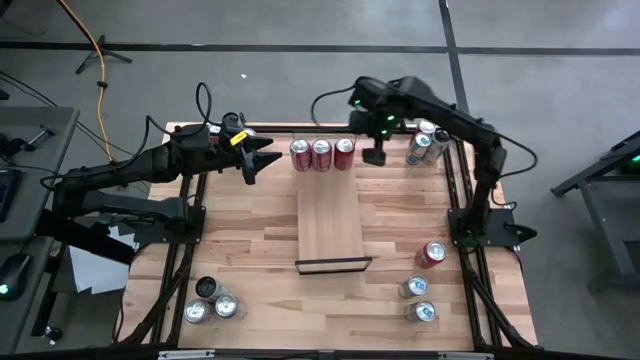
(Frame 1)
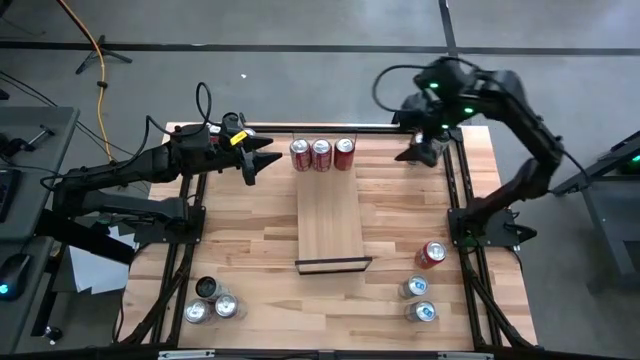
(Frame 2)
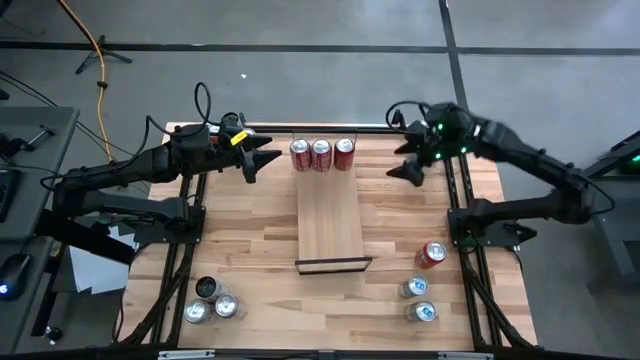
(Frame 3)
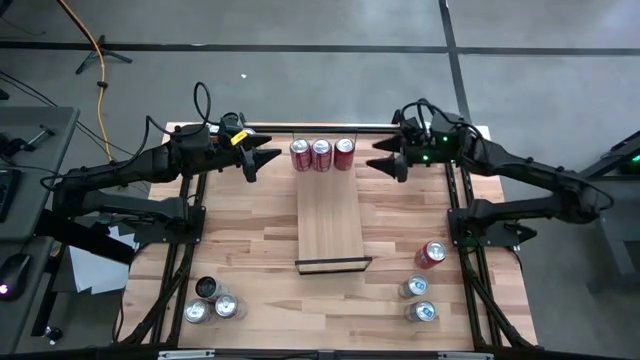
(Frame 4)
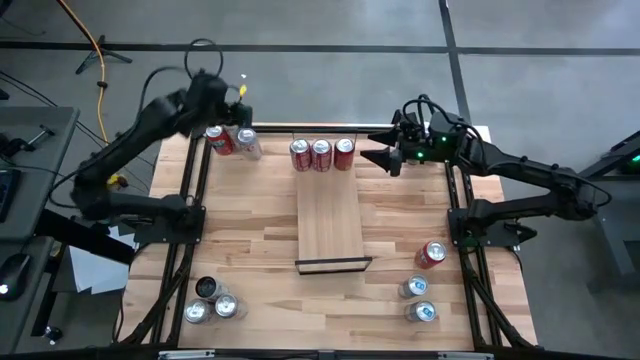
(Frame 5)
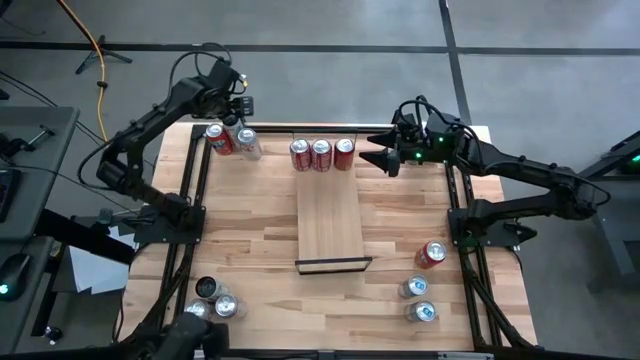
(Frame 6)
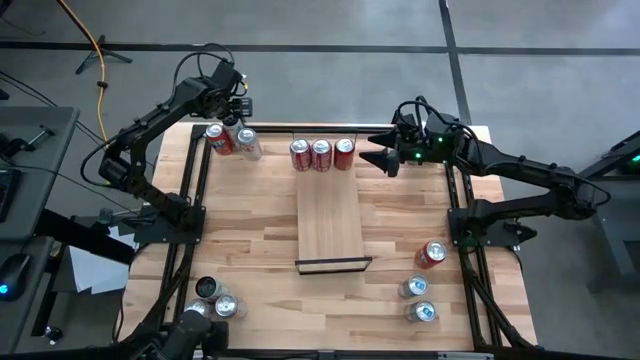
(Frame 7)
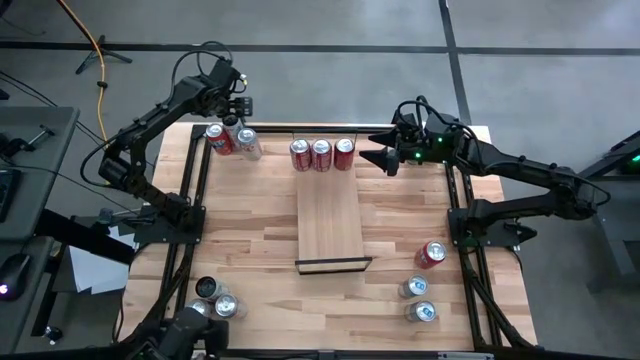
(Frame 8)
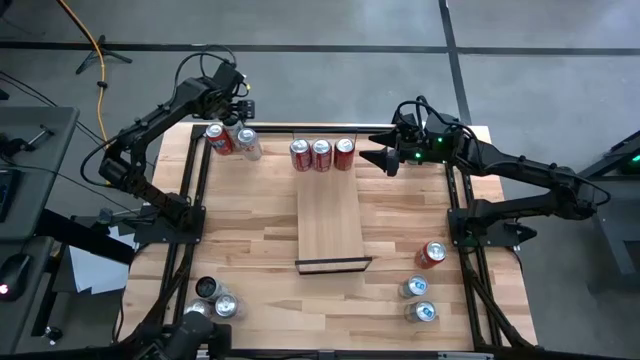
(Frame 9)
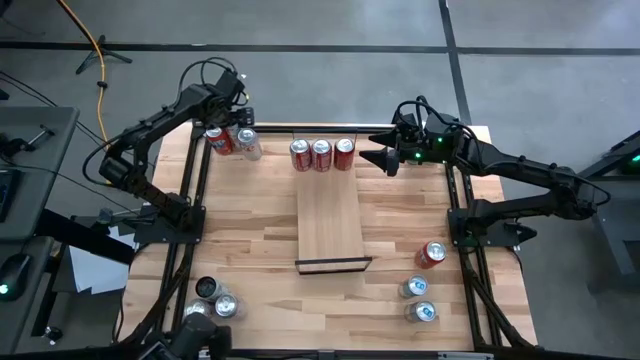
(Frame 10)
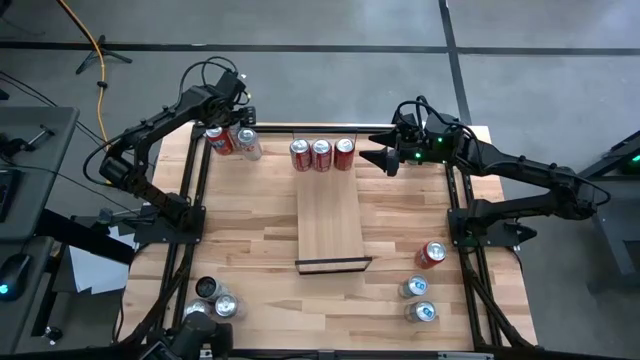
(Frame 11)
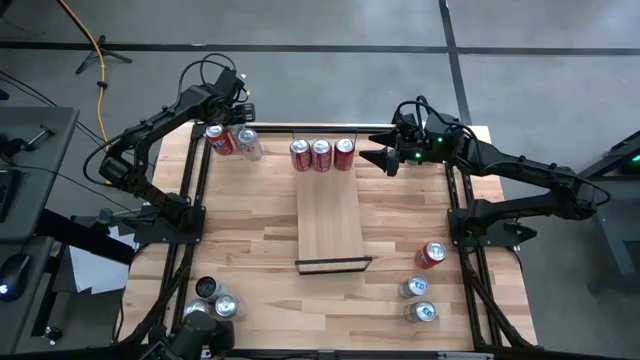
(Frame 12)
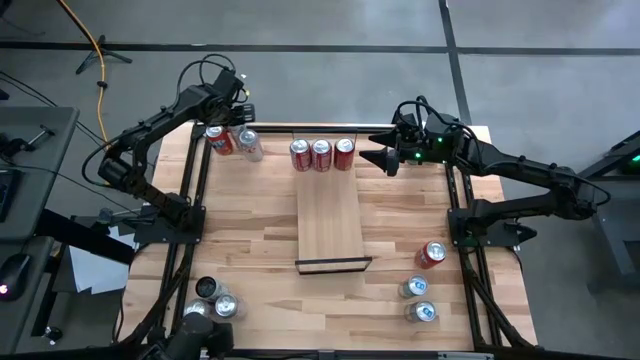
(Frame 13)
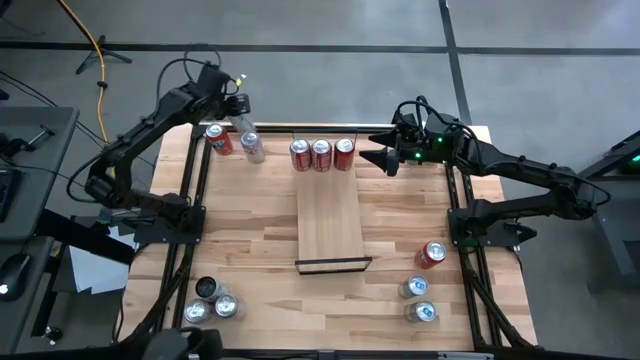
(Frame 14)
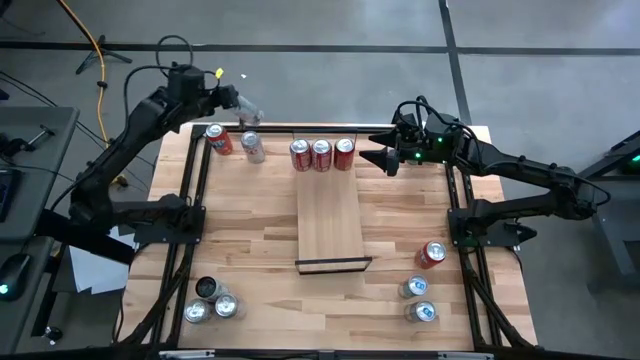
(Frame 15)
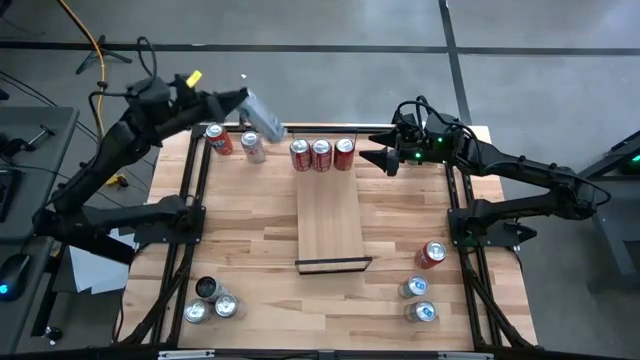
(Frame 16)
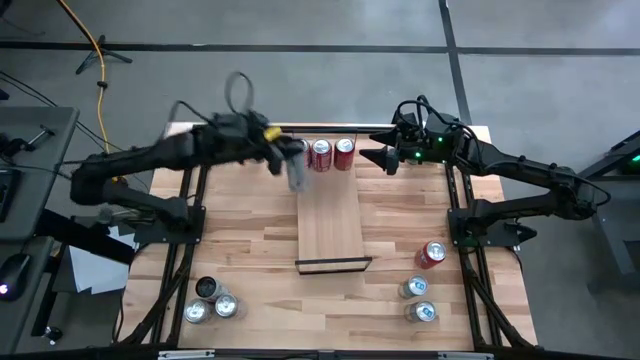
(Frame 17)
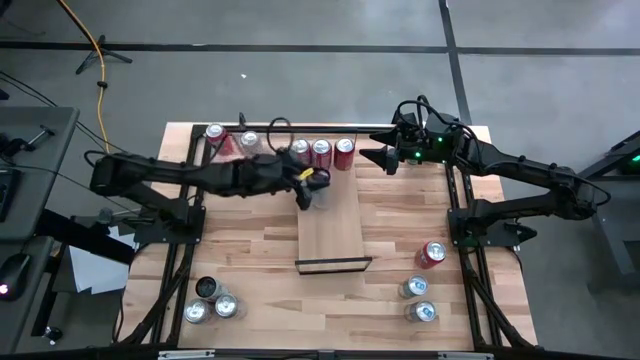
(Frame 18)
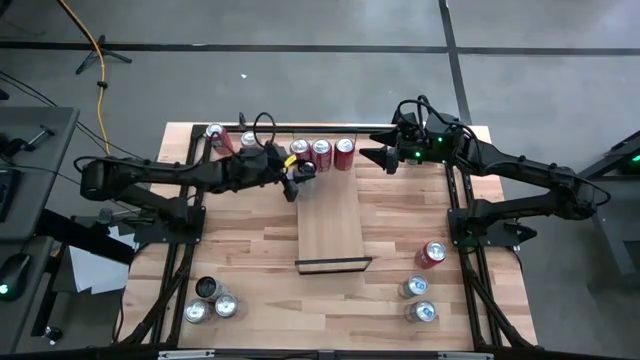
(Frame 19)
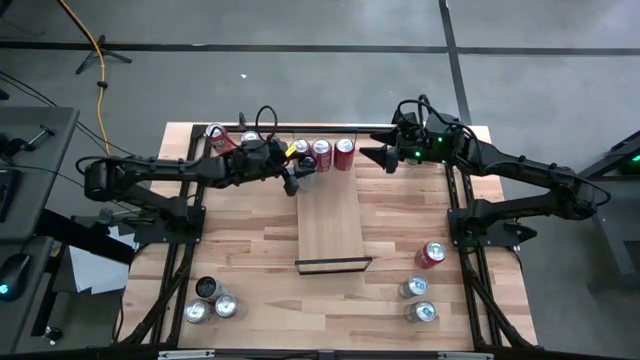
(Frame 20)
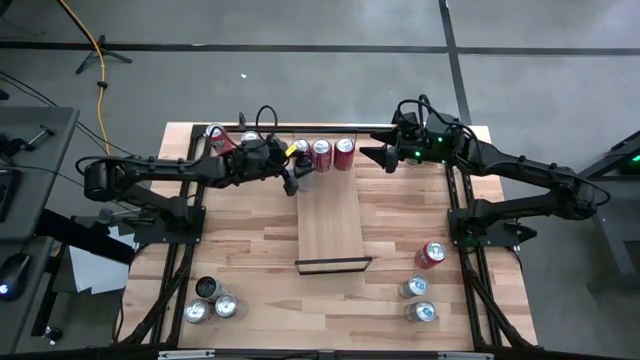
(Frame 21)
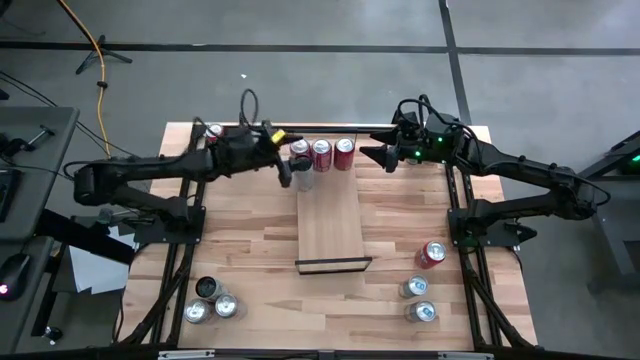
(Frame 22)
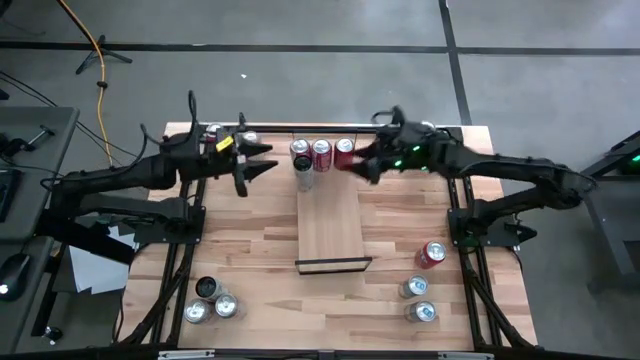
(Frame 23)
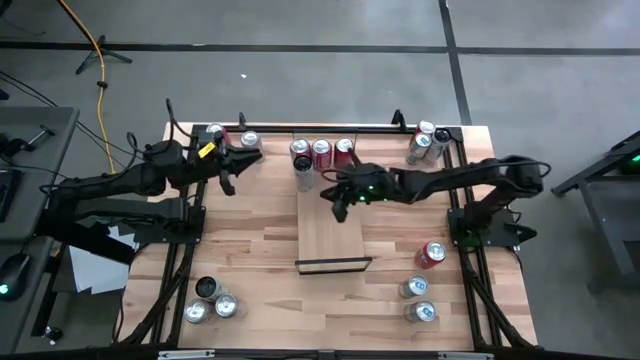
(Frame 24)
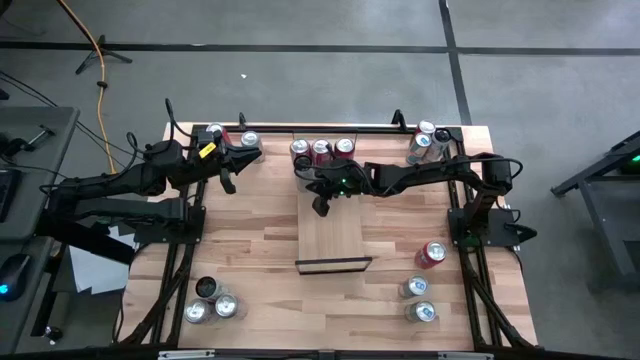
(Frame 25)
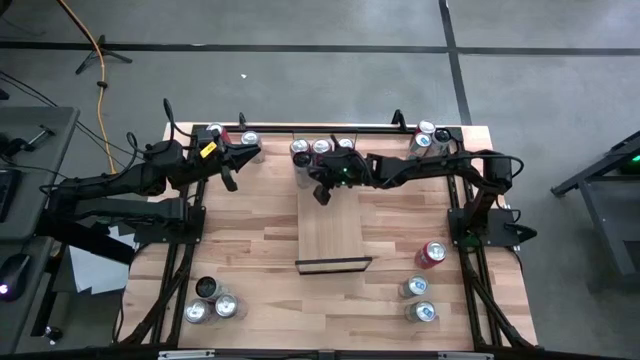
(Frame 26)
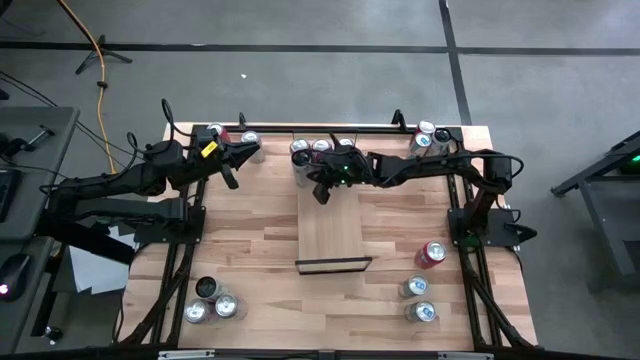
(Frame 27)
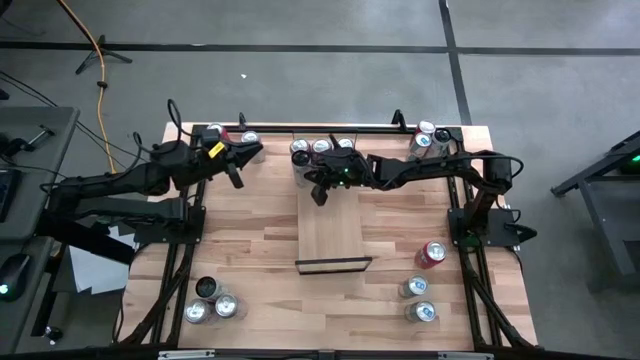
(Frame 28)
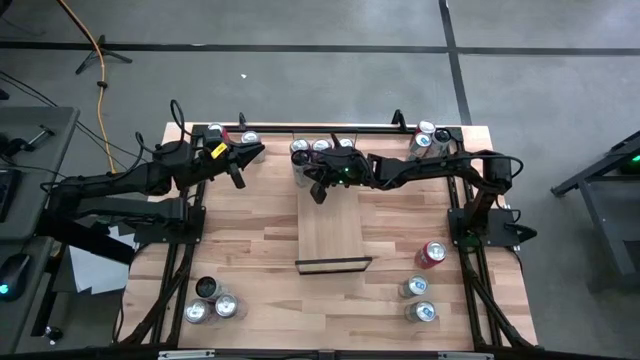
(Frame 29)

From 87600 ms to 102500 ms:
Task: Place canned beverage on shelf
Put the black soda can on the shelf

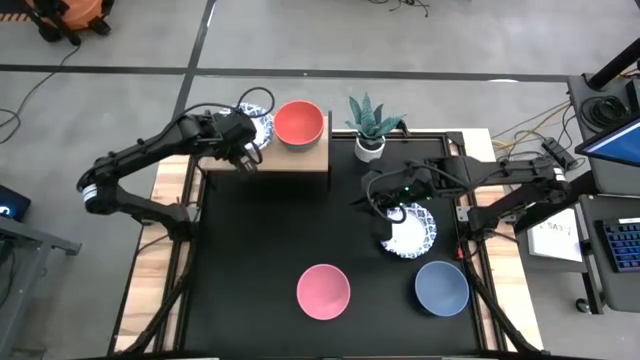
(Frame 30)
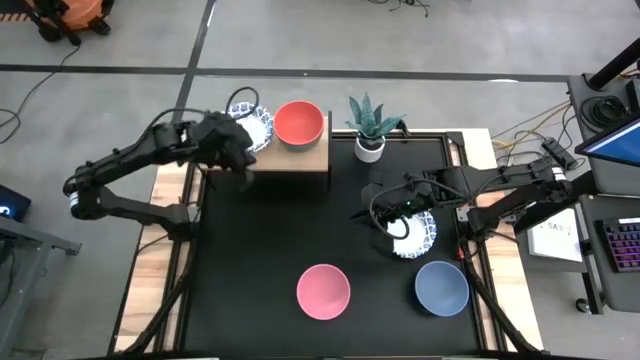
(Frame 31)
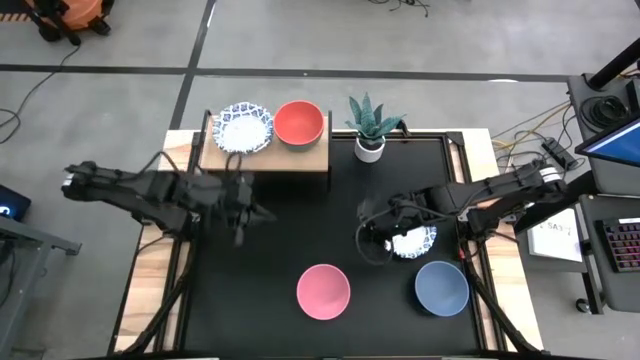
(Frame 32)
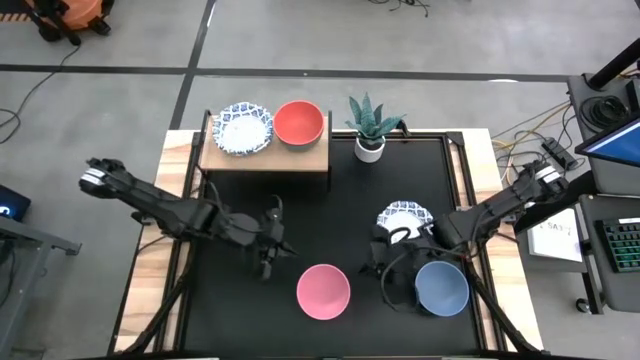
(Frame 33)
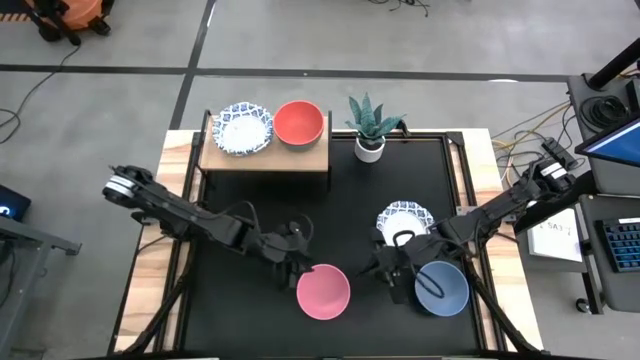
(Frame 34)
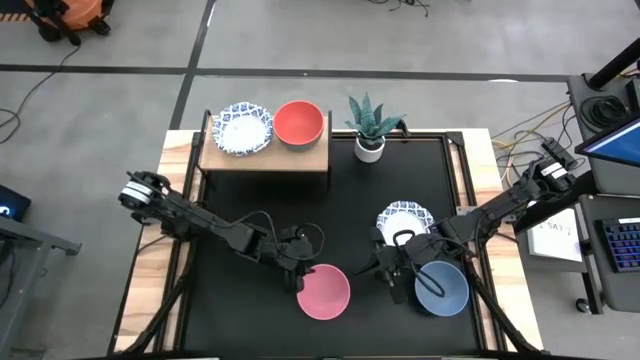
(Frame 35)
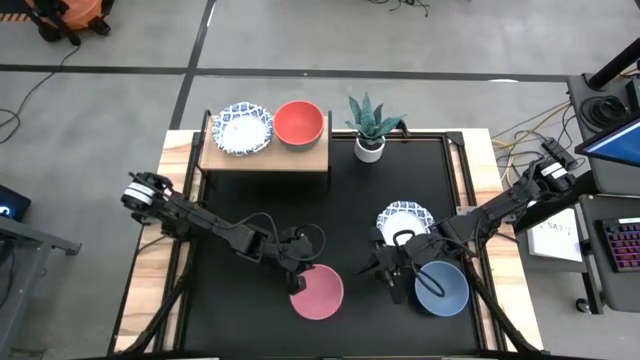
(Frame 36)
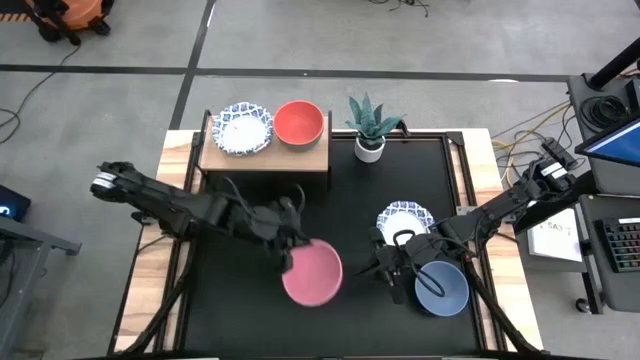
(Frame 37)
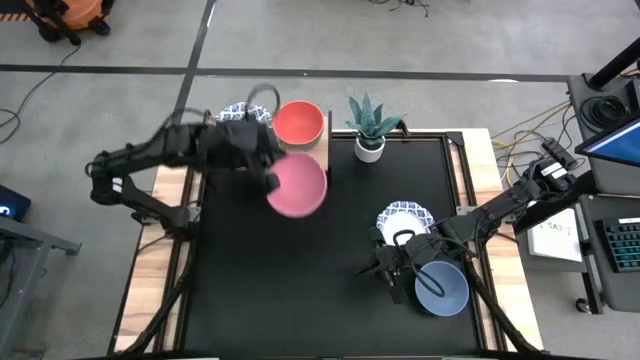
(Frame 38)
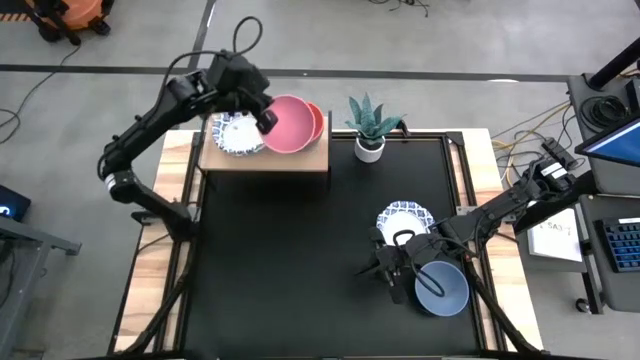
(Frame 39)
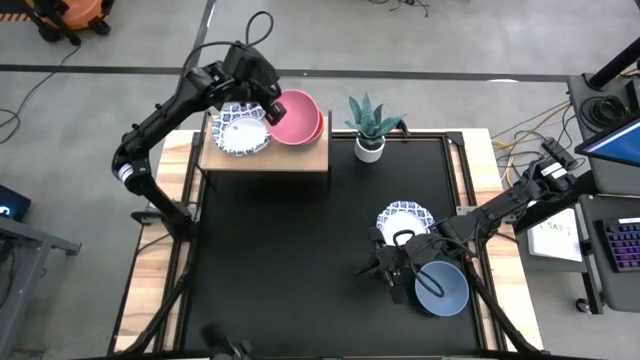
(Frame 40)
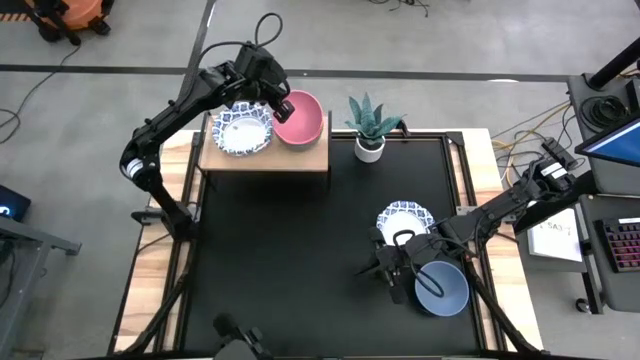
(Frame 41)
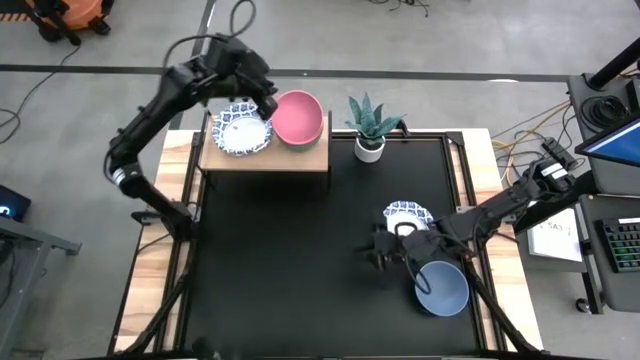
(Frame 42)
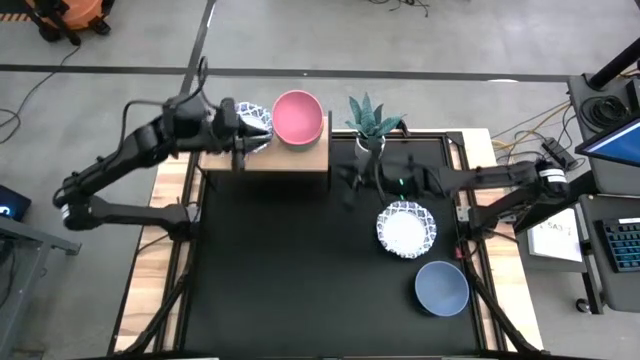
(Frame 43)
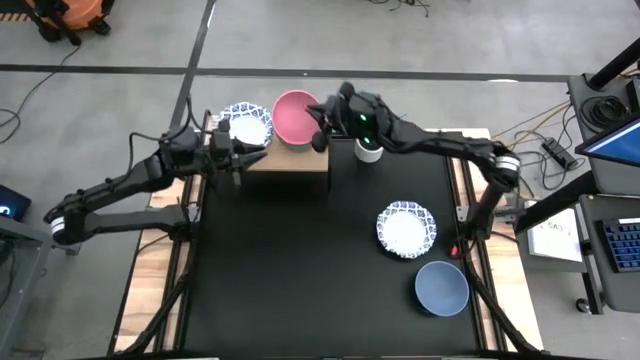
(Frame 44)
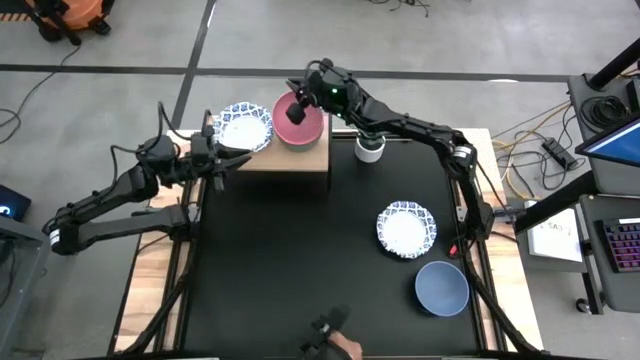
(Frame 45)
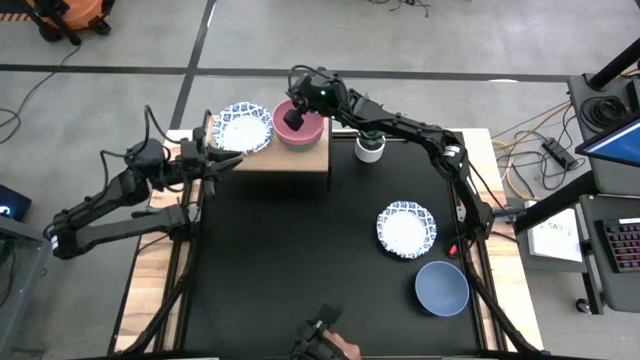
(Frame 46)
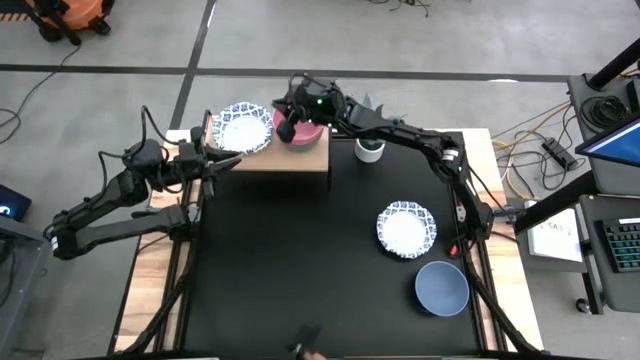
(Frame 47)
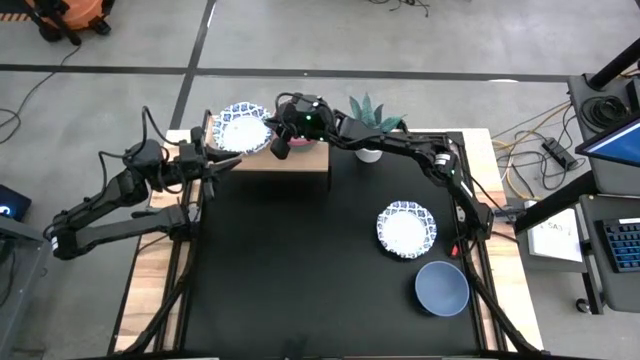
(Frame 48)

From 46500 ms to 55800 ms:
Task: Place and stack bowls onto a shelf
Stack the pink bowl on top of the red bowl on the shelf
